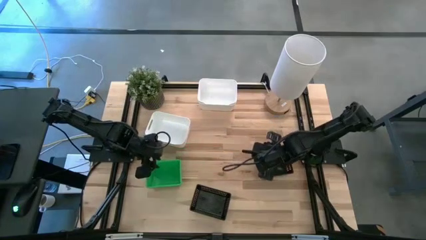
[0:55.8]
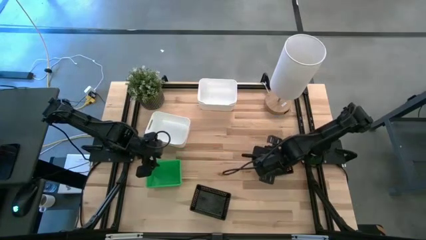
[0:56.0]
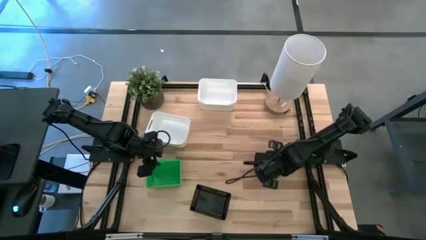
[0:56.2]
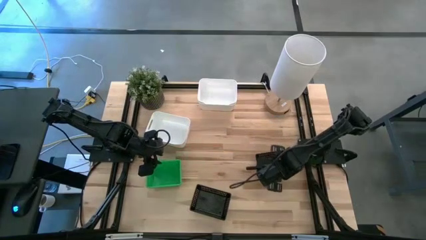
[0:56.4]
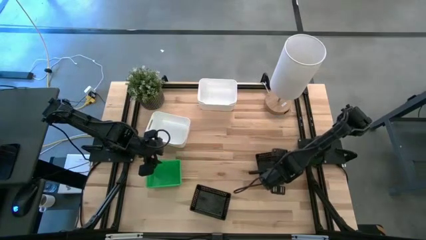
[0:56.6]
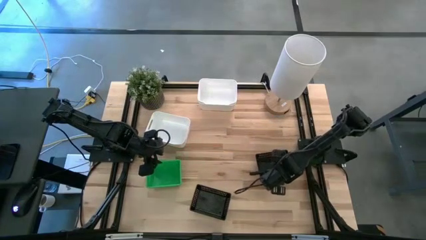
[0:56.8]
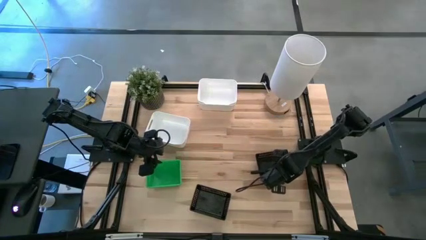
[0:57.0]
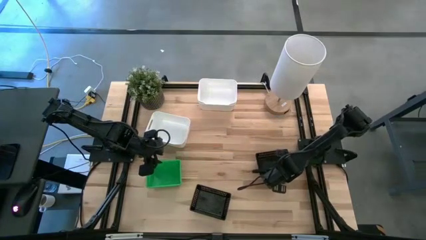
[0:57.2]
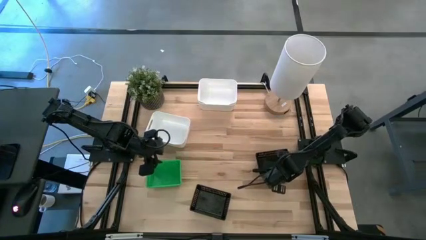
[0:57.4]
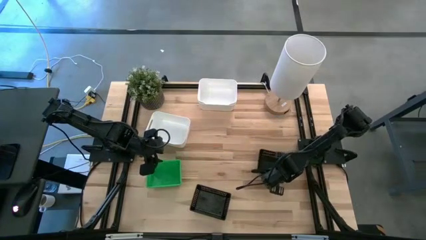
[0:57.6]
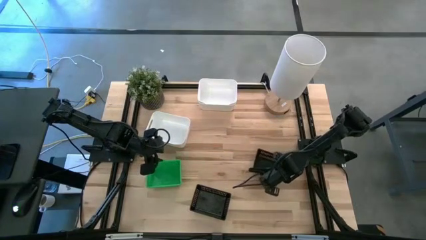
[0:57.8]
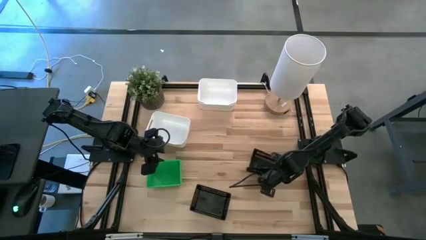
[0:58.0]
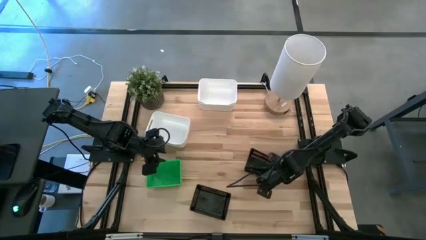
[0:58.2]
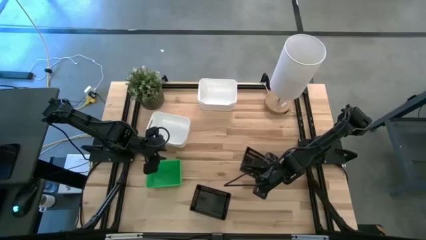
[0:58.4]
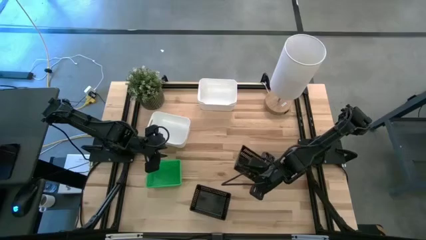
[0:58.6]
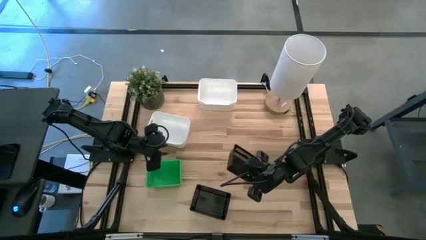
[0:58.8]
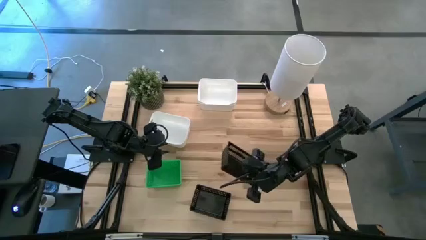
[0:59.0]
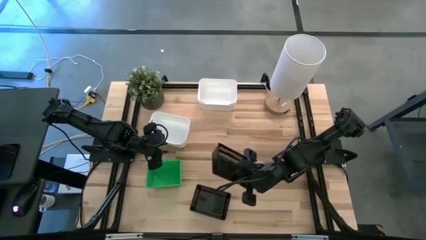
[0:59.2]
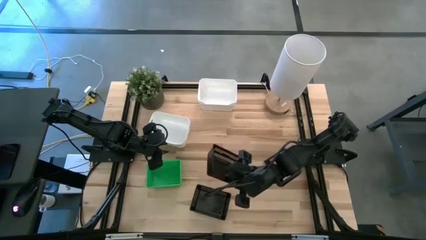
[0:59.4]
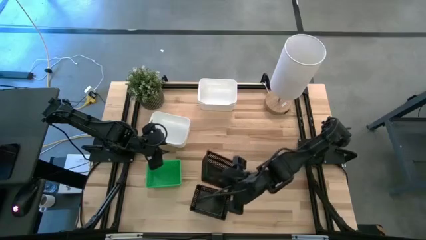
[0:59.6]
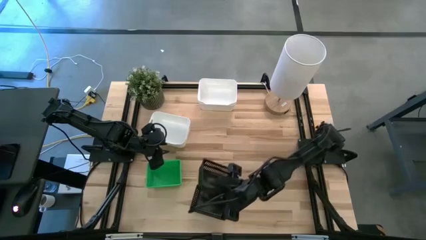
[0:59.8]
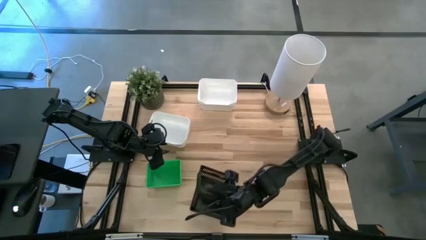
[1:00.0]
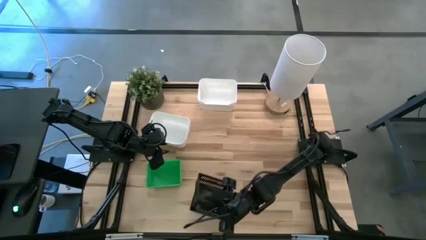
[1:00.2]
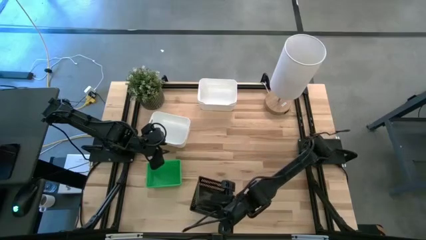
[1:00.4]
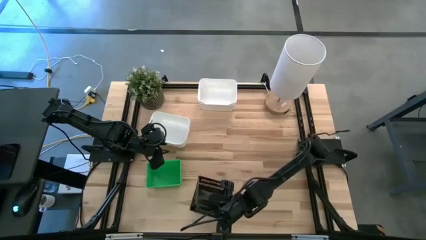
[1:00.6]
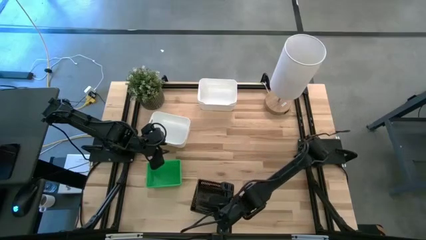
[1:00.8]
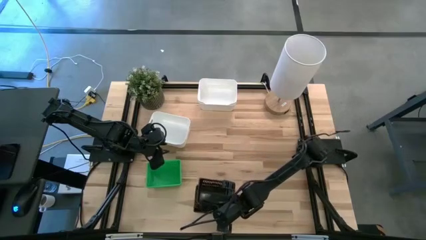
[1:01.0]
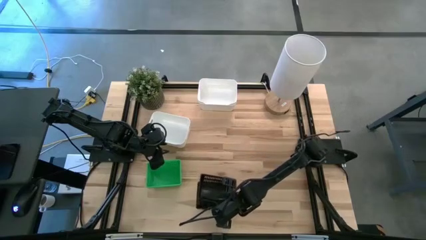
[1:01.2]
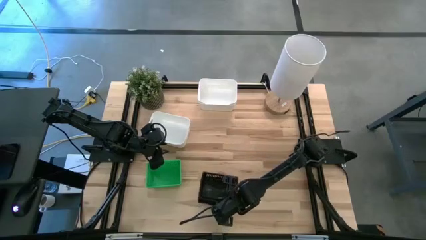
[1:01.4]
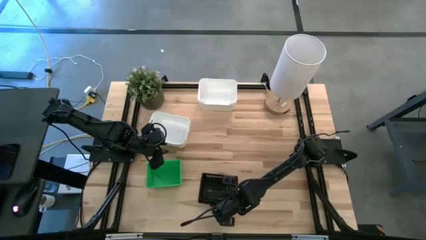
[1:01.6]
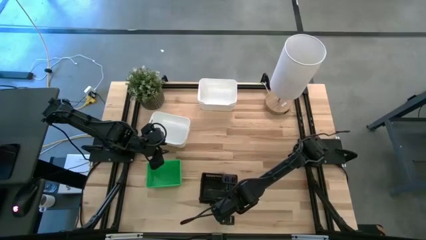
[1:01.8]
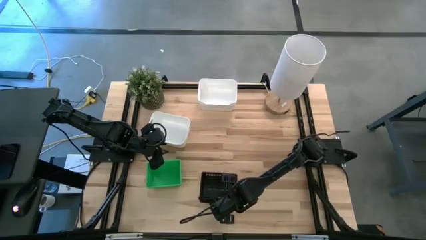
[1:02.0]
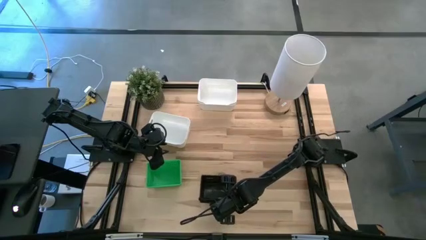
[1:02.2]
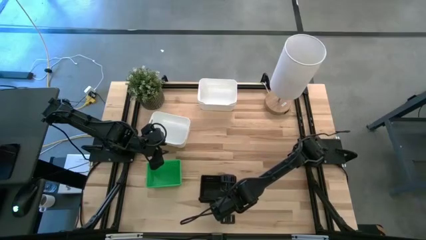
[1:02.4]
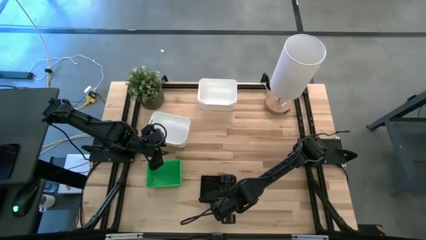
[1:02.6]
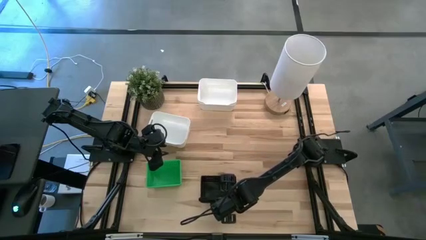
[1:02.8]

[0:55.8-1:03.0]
Stack the right black bin on the bottom black bin

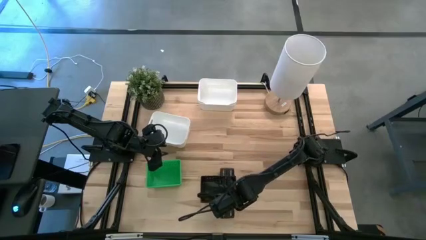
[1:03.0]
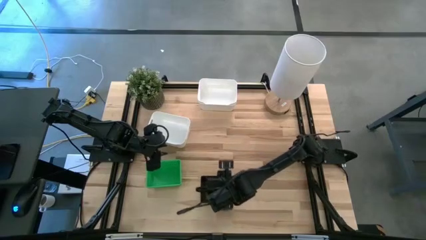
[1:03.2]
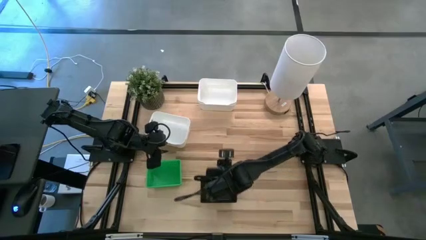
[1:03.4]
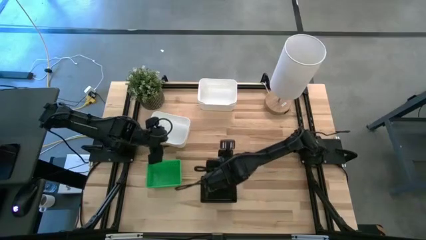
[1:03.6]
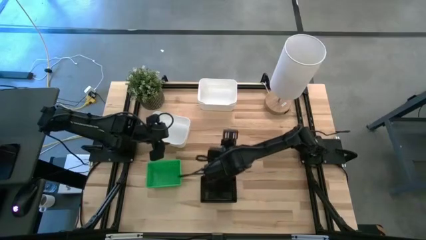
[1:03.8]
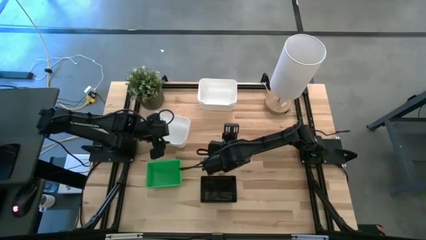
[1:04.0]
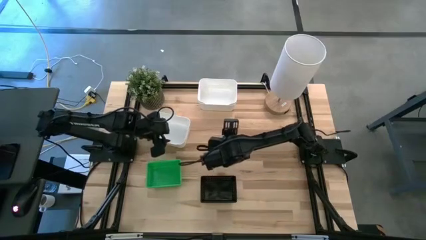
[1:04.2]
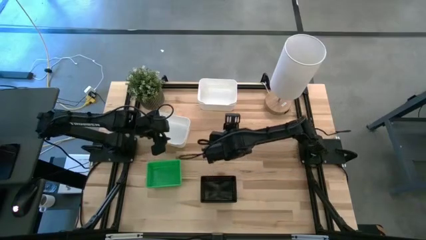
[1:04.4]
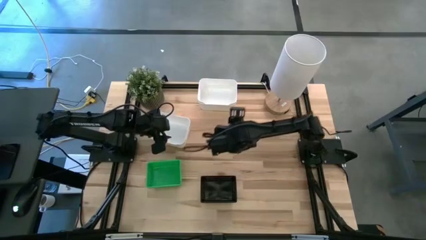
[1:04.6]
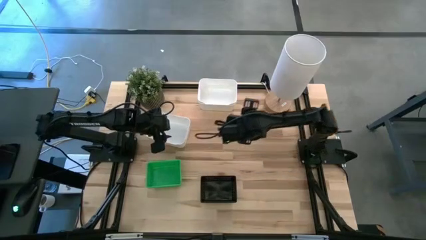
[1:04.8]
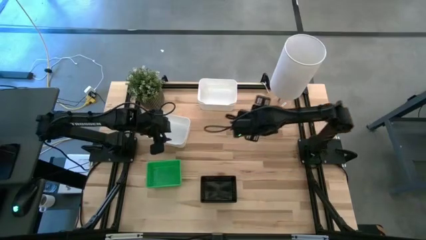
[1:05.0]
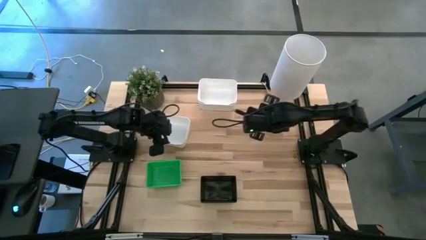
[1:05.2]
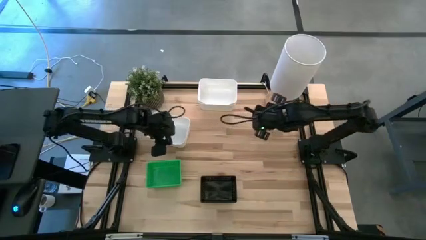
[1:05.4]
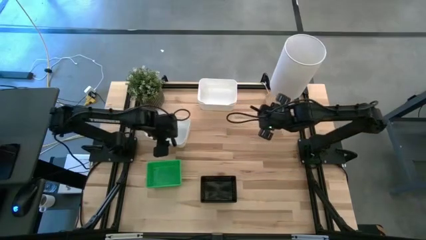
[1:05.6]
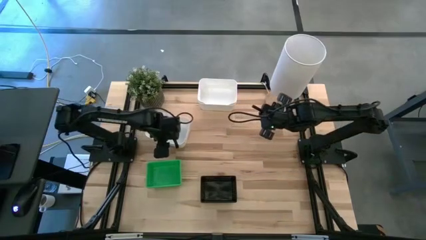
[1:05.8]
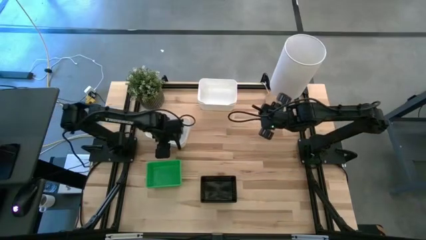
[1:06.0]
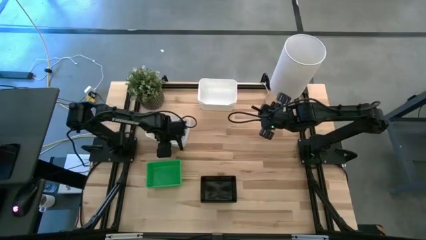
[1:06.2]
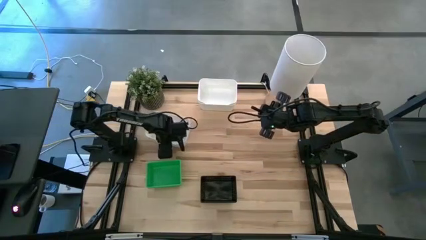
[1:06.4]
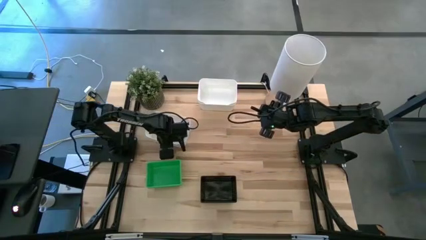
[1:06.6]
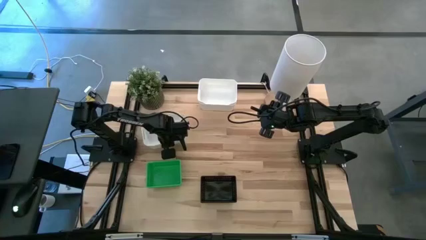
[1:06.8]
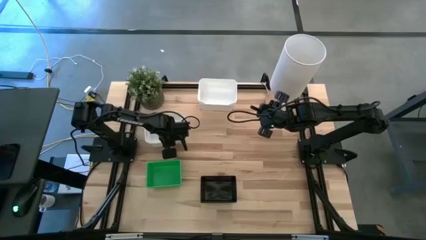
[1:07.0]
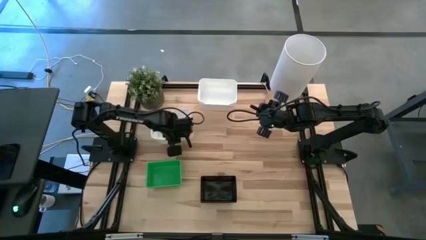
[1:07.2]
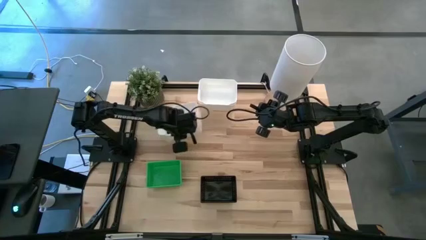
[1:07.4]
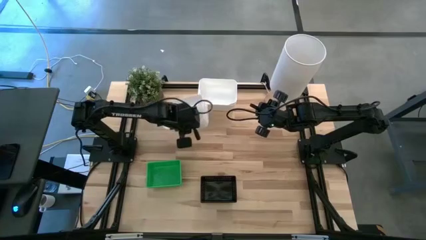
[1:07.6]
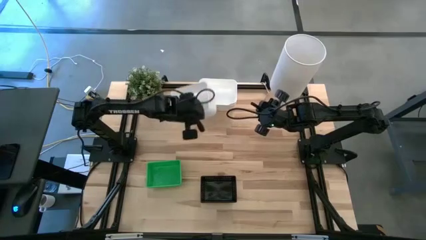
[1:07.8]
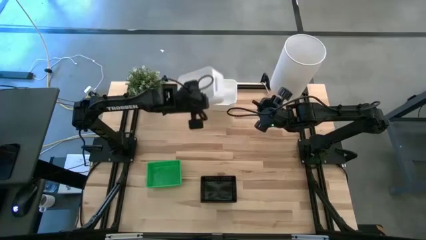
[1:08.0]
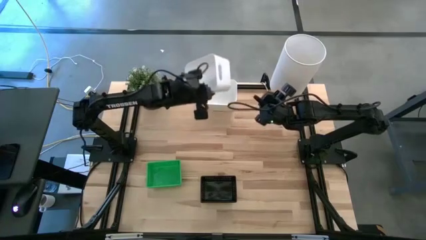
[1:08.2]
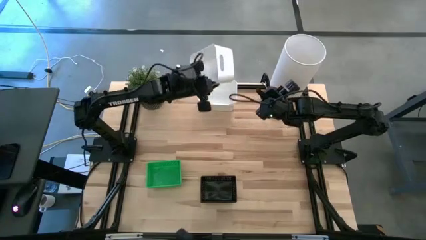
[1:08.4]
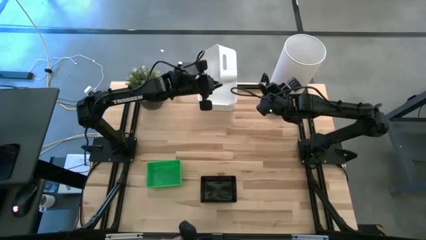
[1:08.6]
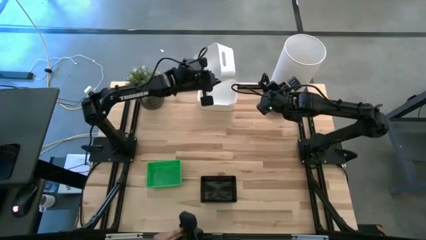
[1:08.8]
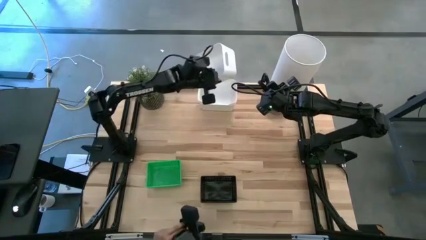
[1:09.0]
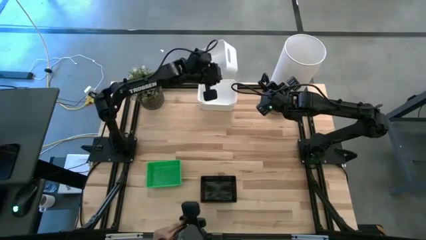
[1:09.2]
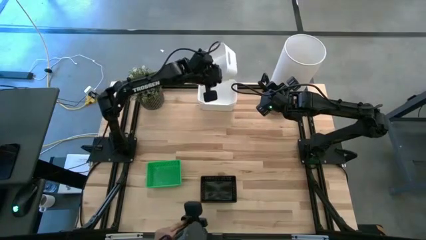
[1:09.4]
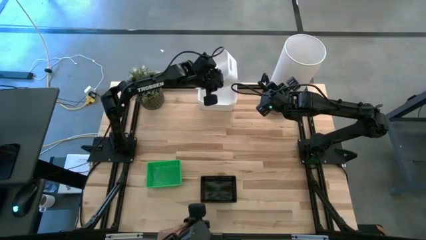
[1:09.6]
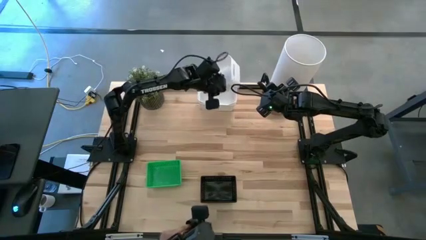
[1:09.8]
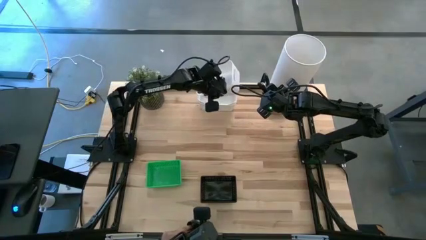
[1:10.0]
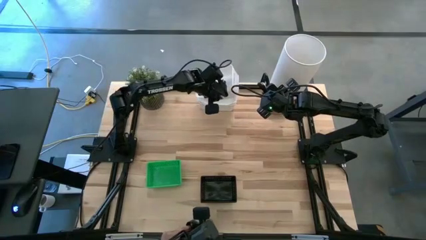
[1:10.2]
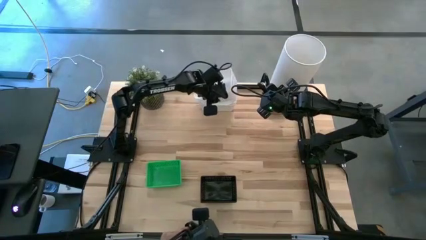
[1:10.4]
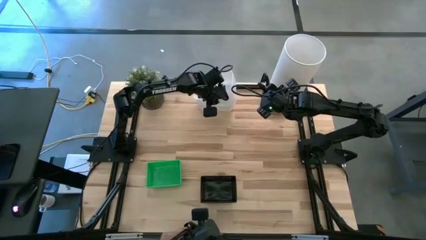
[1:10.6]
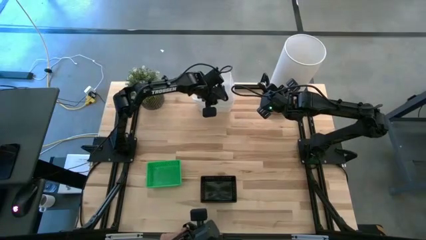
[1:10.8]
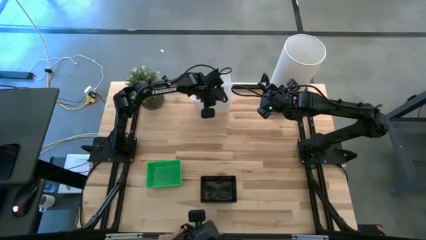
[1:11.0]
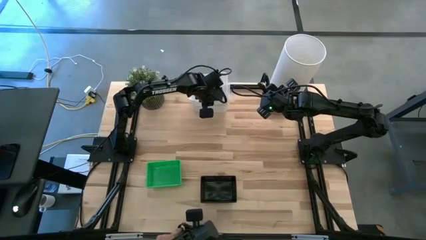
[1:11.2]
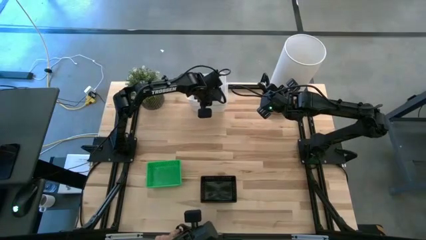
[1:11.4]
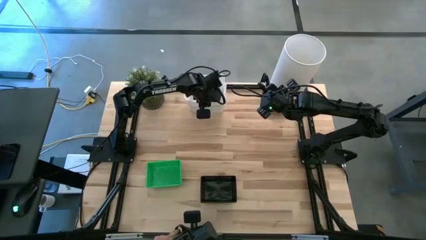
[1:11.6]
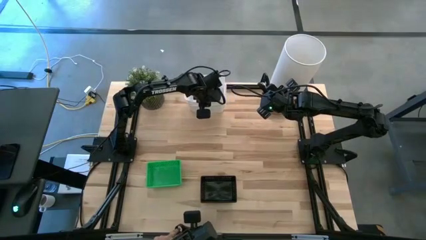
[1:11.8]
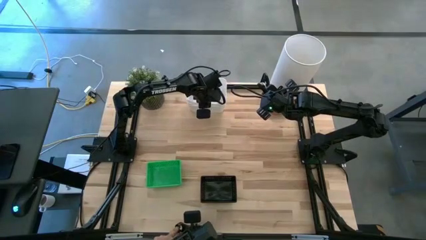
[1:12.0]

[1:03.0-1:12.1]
Stack the bottom white bin on the top white bin
